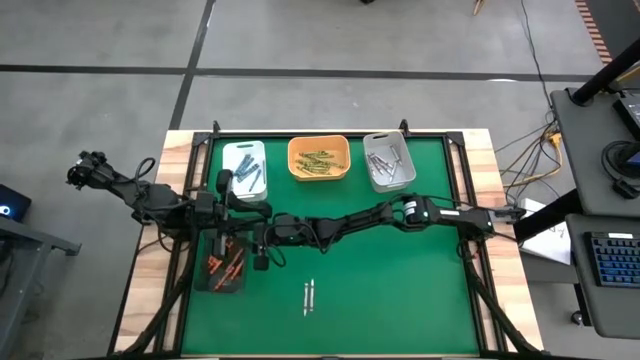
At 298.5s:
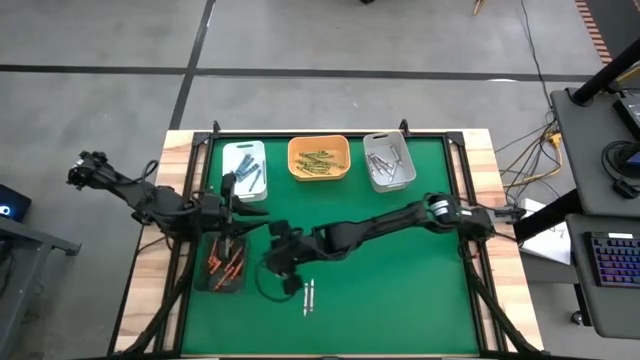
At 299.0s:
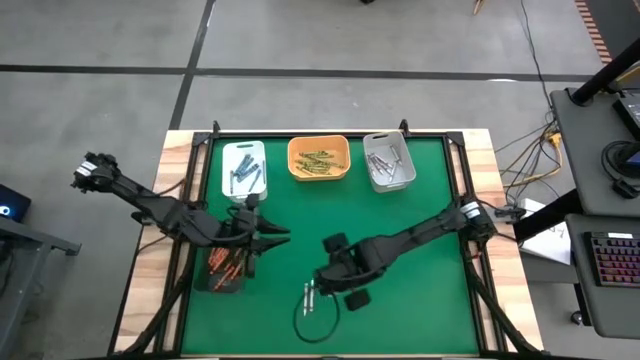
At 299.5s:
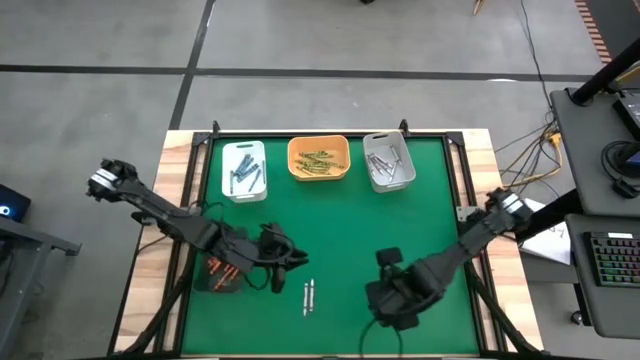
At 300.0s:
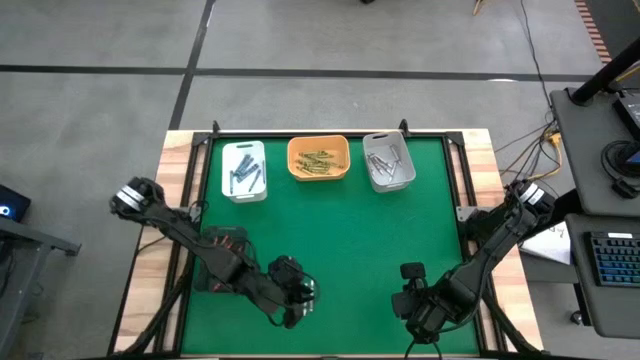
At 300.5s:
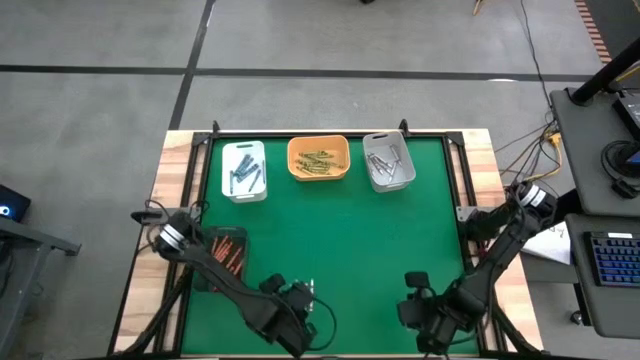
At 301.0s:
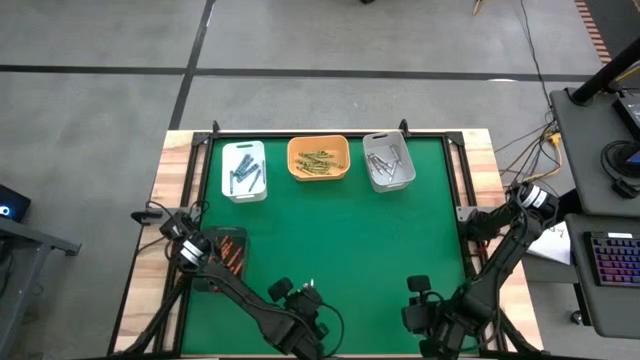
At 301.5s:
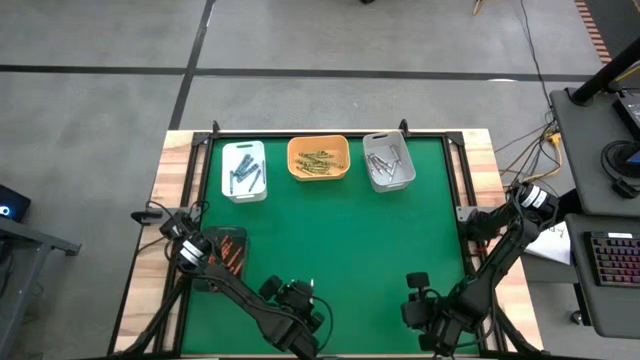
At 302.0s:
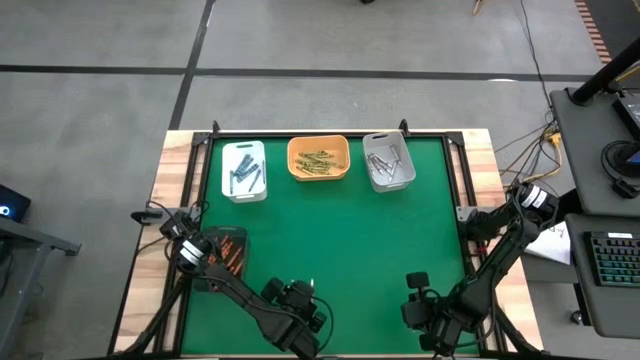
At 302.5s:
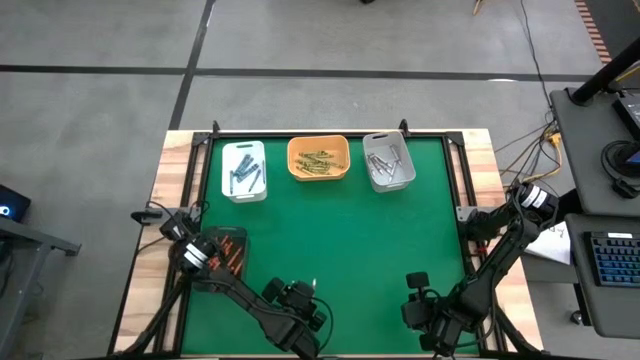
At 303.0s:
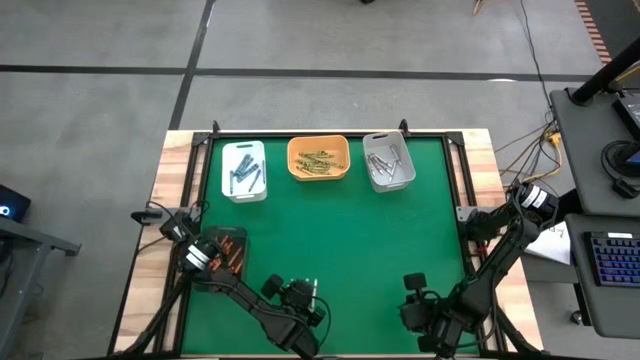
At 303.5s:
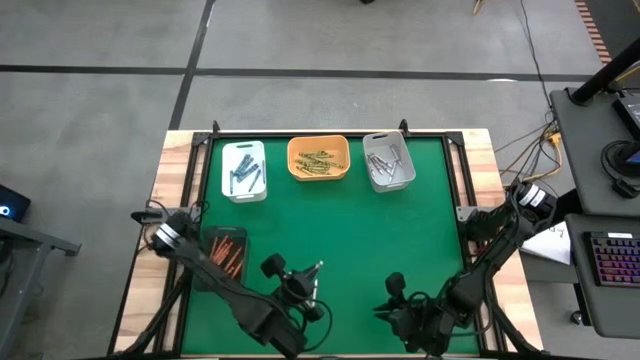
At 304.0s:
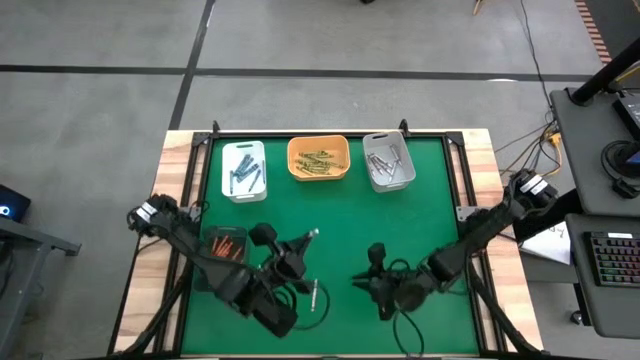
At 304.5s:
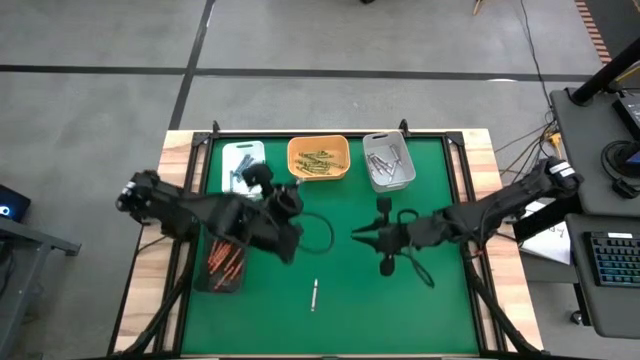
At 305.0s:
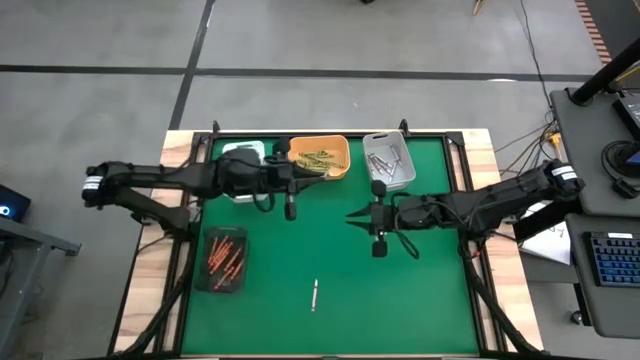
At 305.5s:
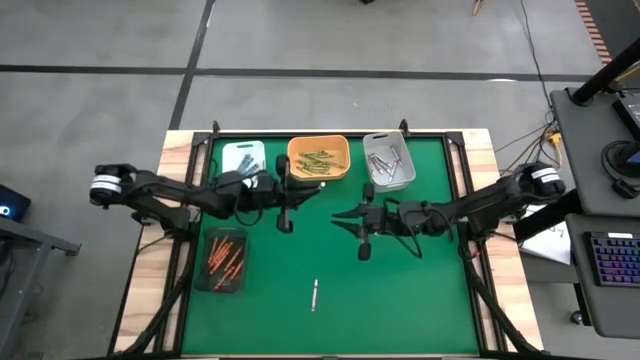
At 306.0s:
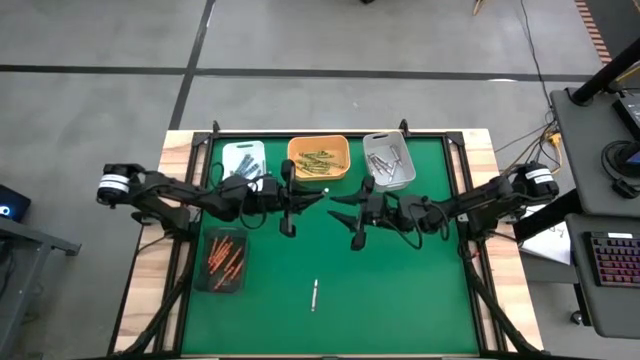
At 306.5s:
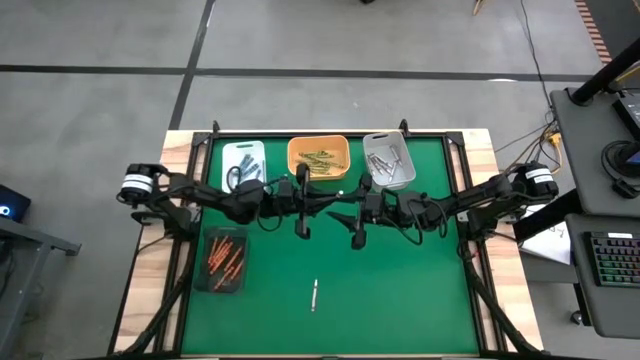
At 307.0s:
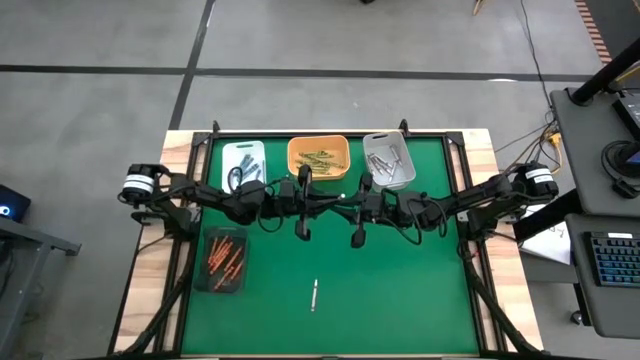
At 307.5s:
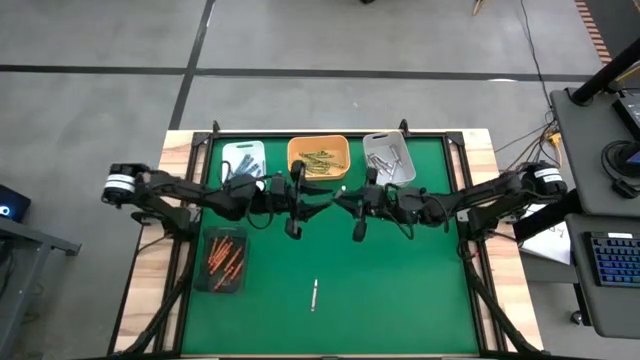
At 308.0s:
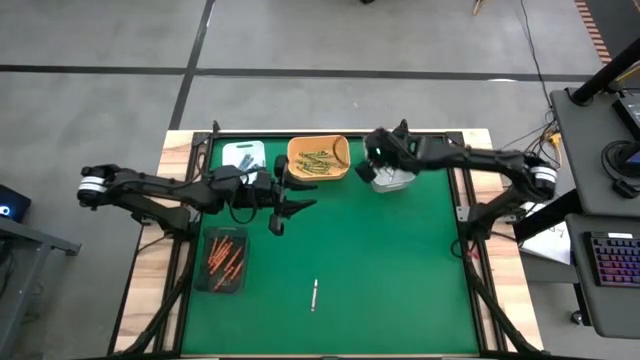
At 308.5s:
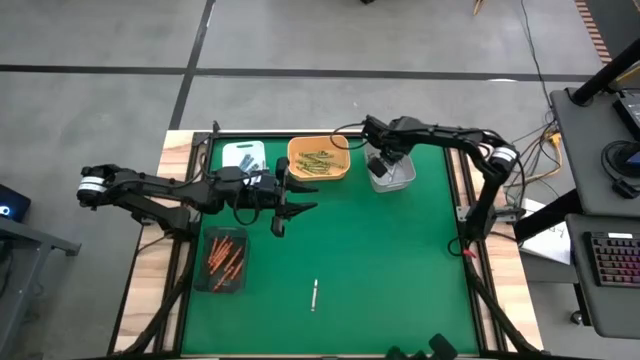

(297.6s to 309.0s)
Task: Sort crayons
Put the white crayon into the gray bin

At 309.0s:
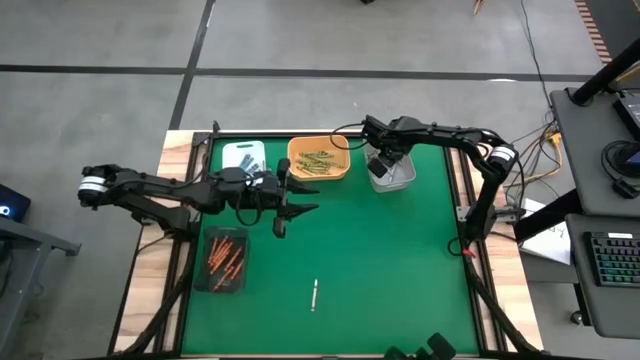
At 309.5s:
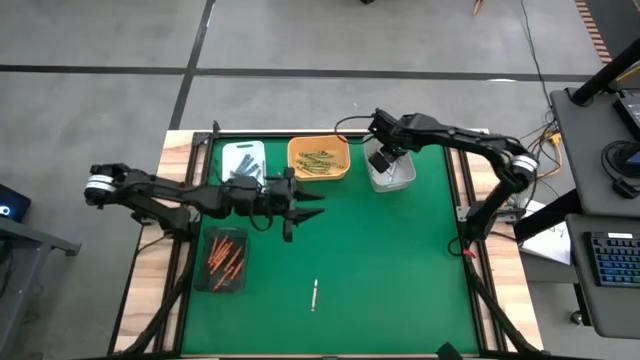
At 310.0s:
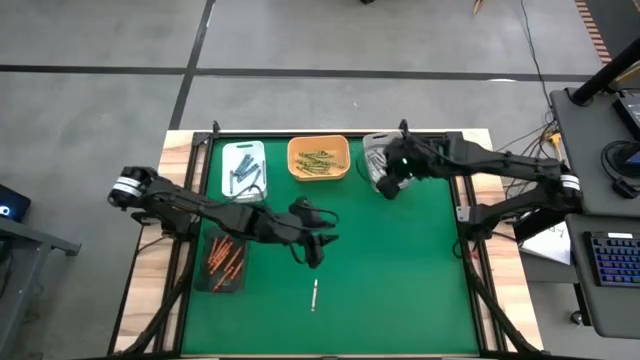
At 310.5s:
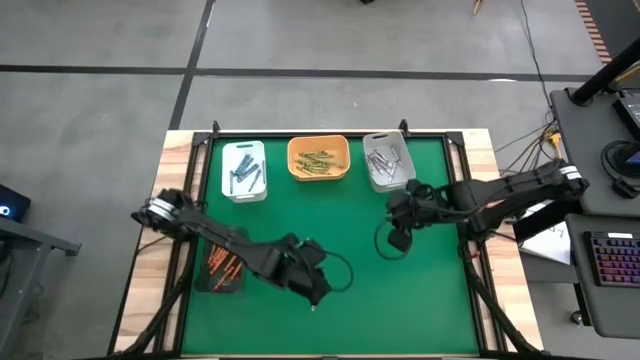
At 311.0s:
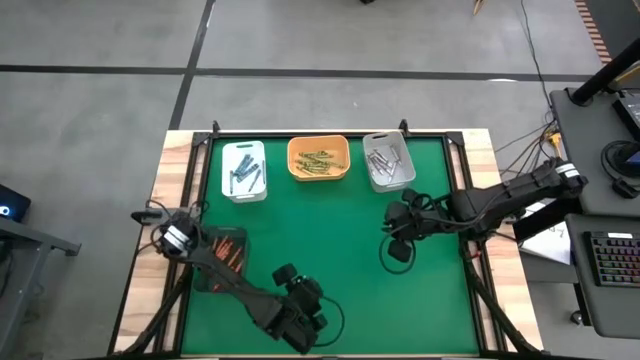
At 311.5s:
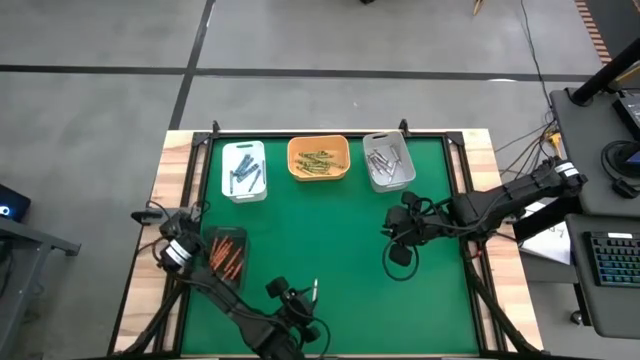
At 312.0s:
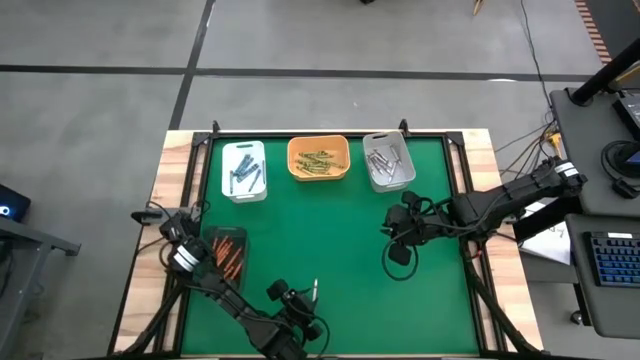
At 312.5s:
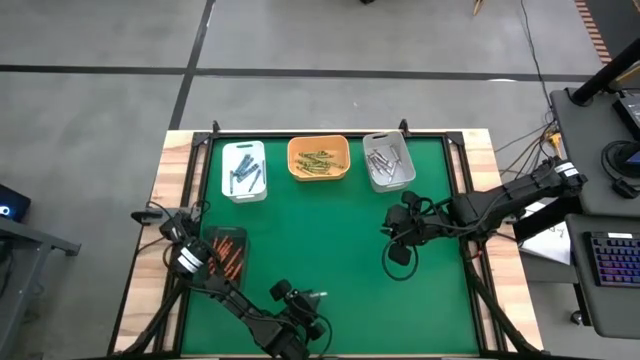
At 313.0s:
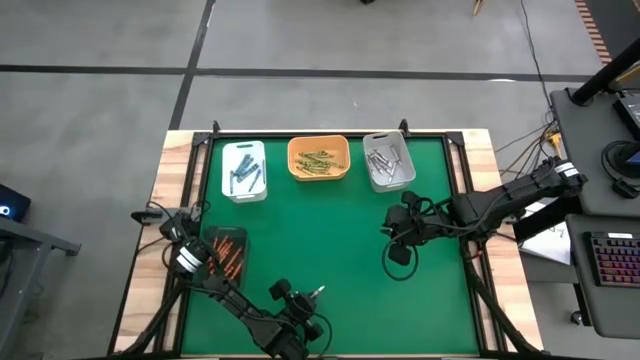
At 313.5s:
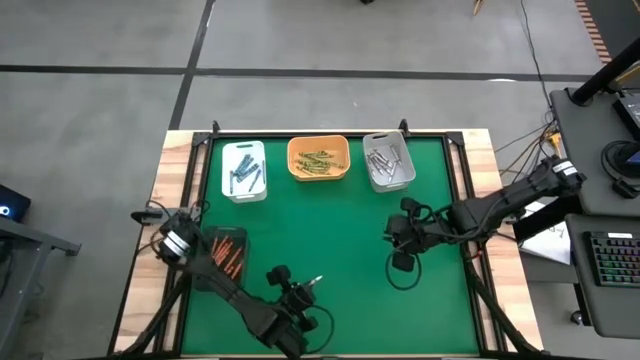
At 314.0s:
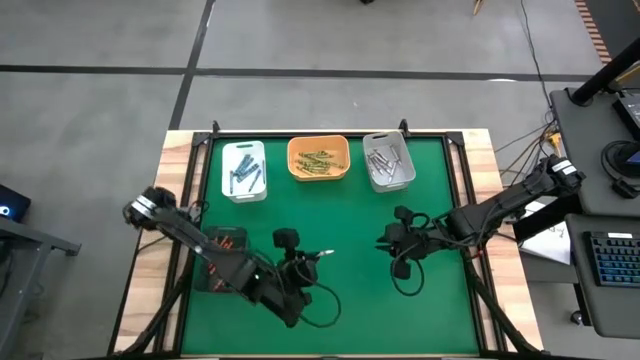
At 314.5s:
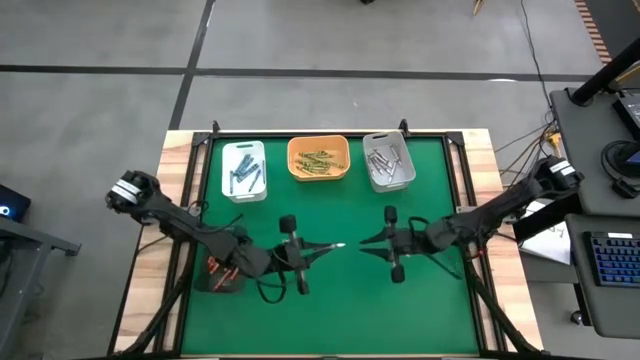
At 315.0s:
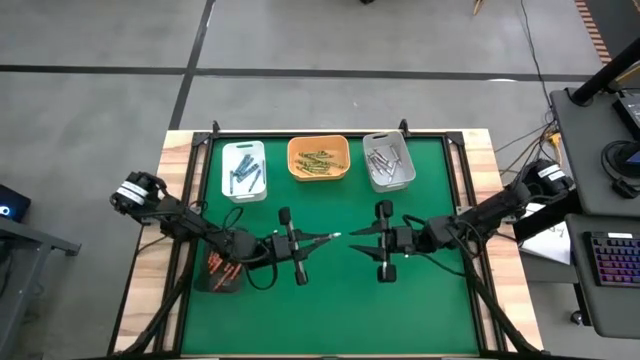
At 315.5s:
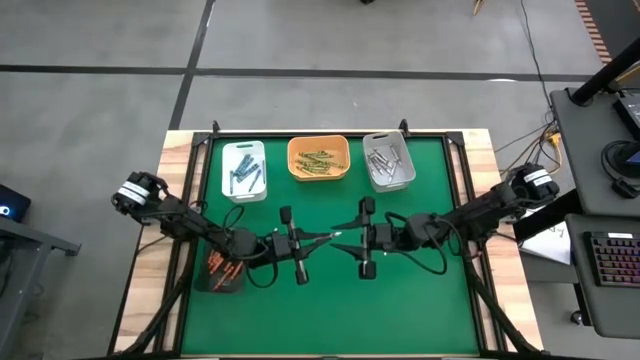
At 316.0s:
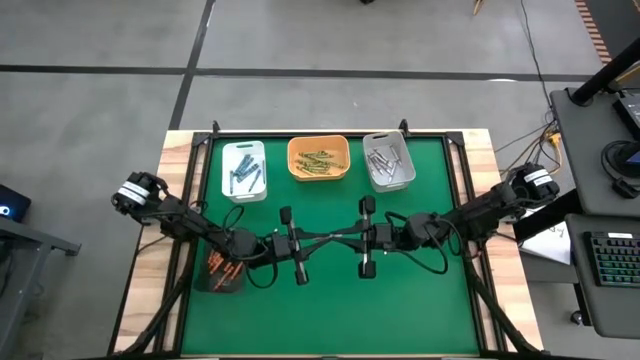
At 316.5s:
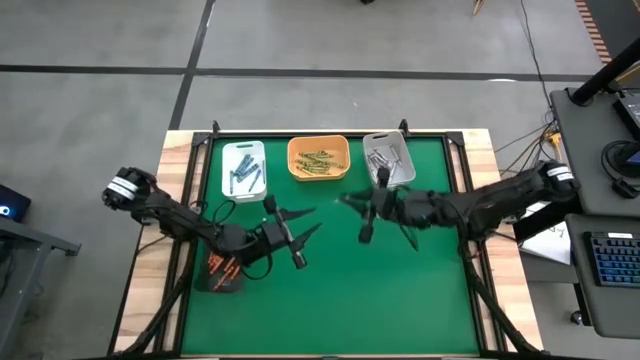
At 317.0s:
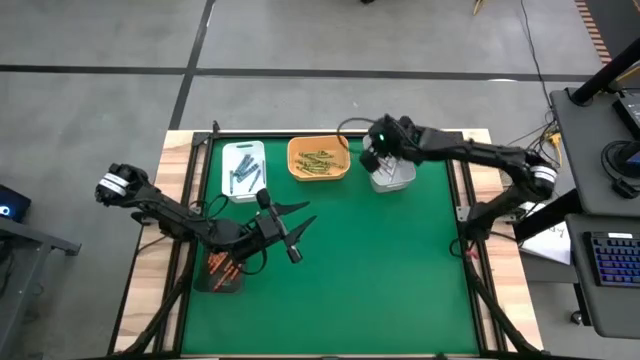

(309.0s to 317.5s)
Put the white crayon into the gray bin

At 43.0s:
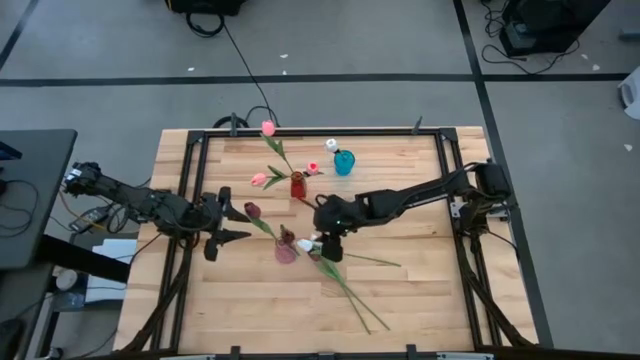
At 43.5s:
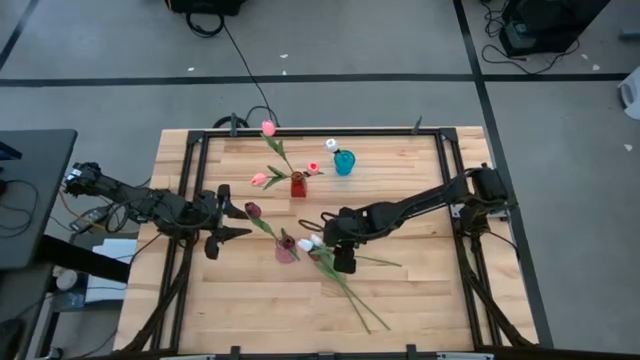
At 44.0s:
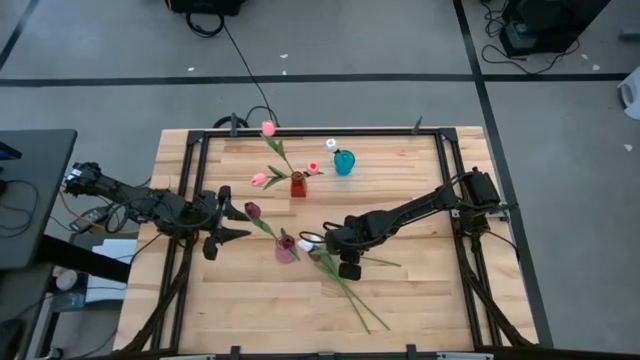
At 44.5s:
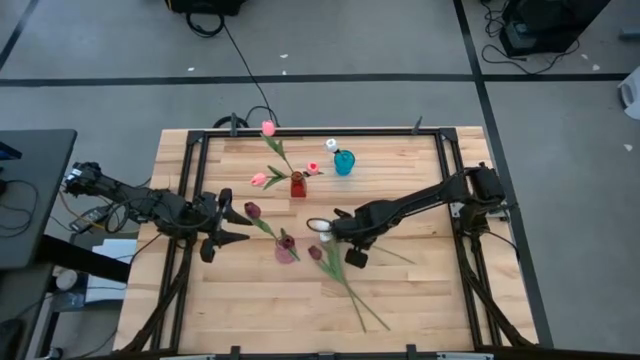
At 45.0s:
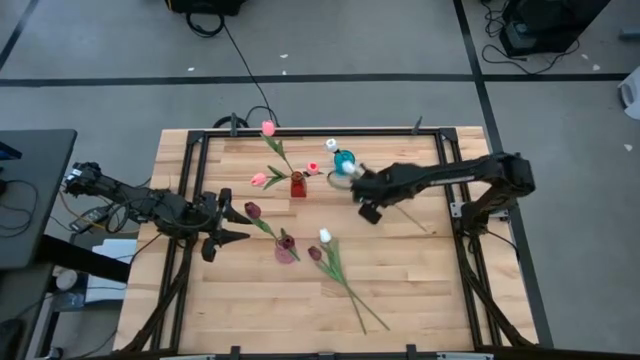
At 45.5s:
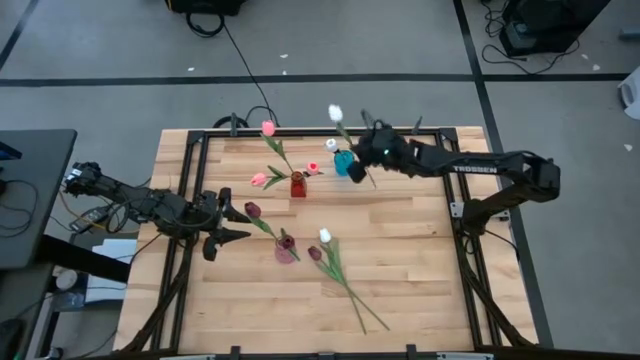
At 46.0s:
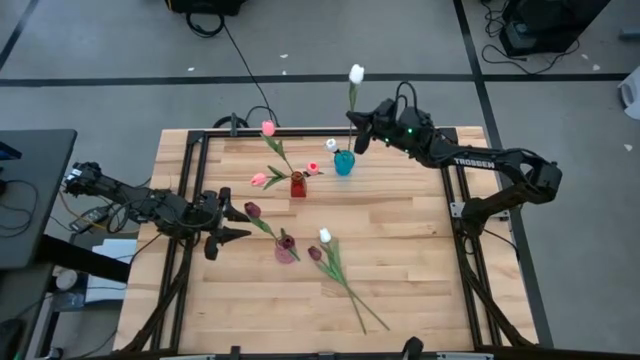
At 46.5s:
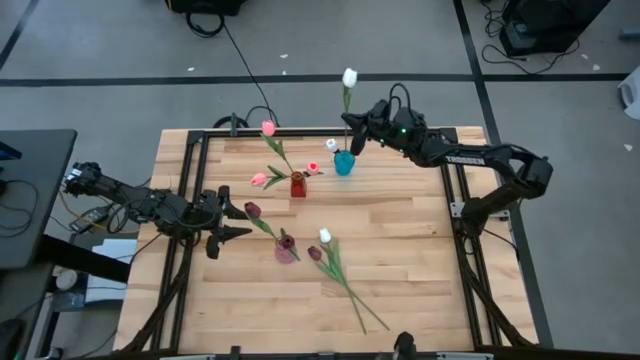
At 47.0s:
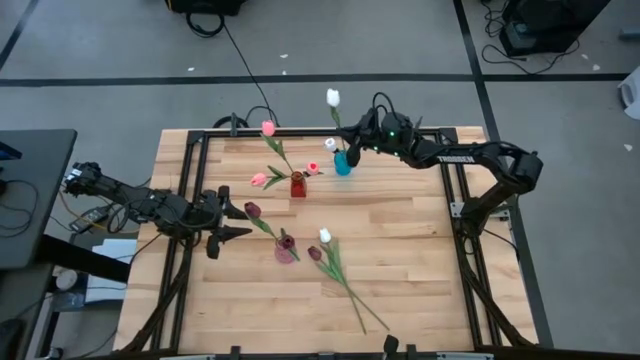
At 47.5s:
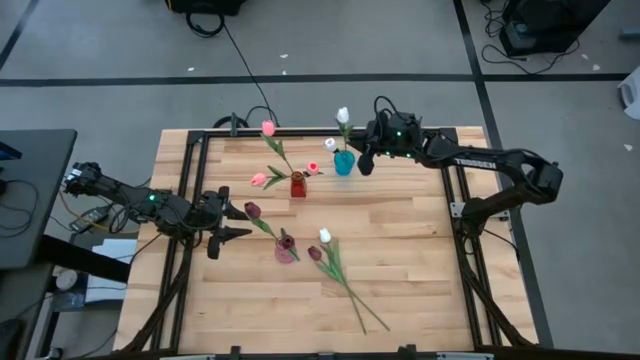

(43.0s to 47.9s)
Task: Sort flowers into vase by color
Put the white flower into the blue vase
